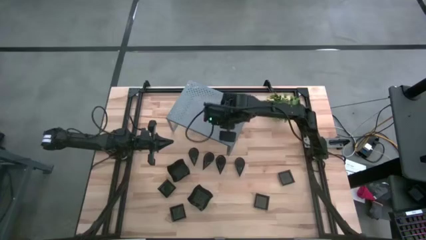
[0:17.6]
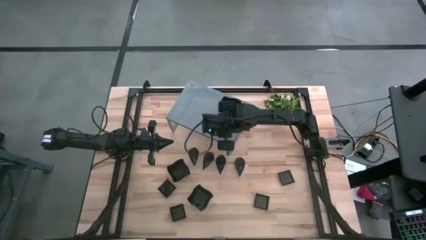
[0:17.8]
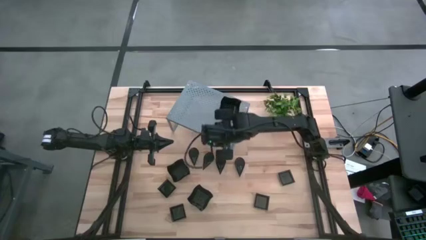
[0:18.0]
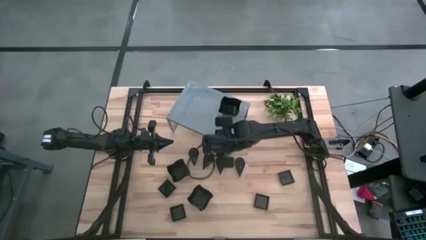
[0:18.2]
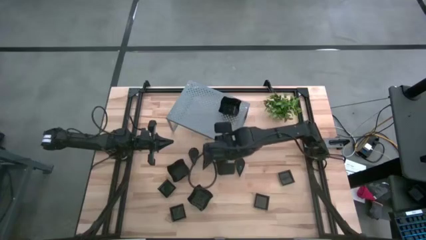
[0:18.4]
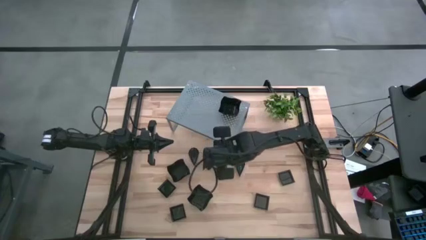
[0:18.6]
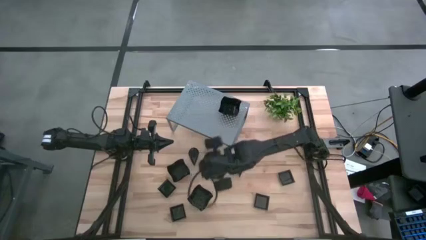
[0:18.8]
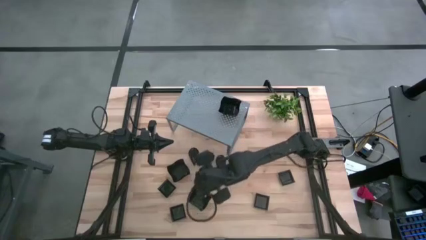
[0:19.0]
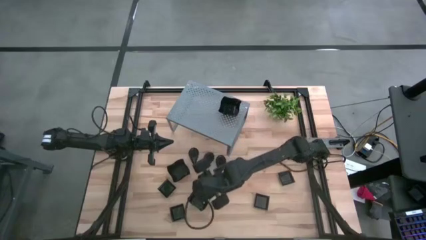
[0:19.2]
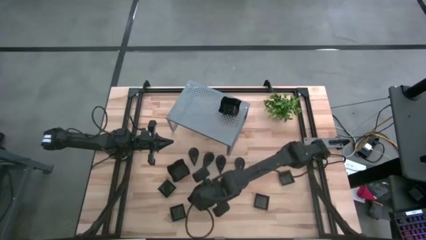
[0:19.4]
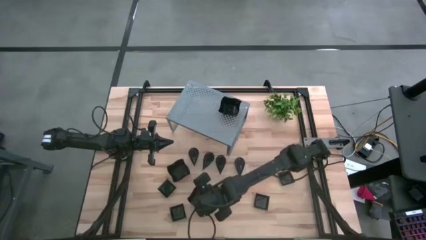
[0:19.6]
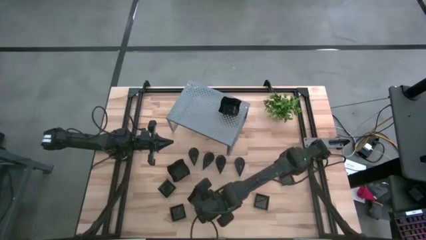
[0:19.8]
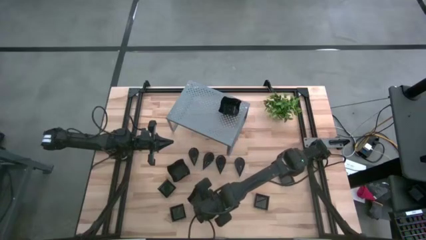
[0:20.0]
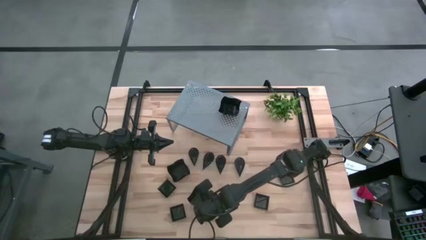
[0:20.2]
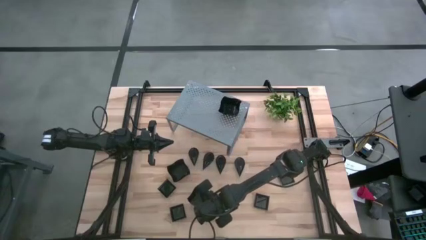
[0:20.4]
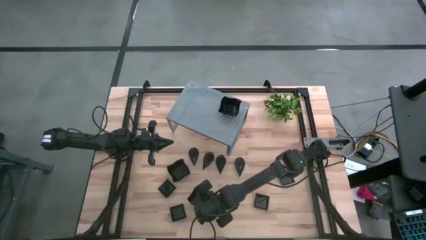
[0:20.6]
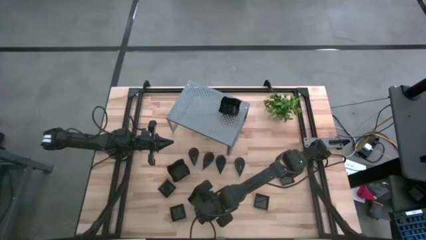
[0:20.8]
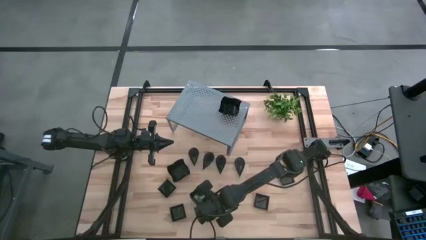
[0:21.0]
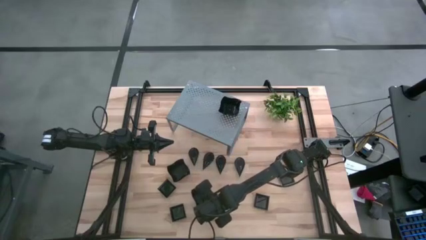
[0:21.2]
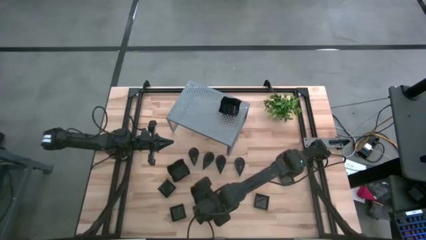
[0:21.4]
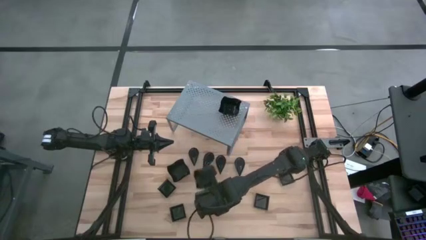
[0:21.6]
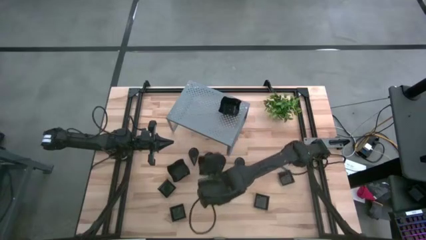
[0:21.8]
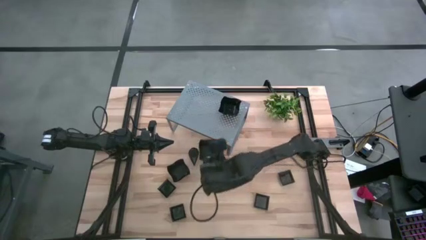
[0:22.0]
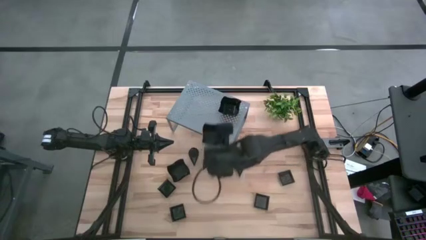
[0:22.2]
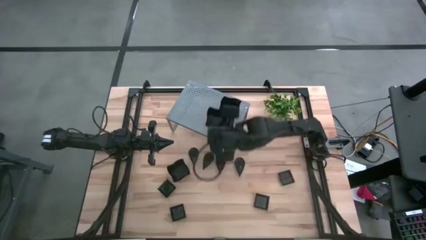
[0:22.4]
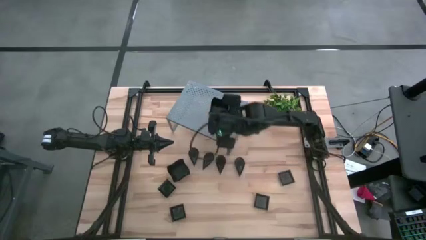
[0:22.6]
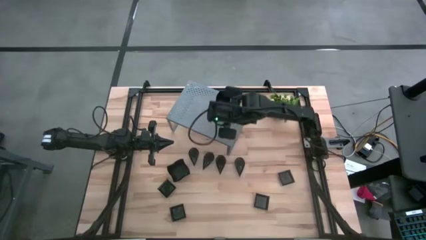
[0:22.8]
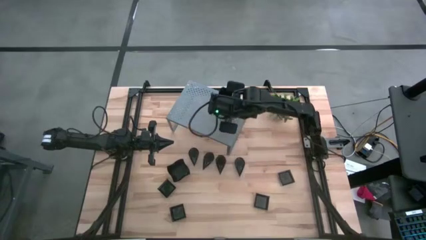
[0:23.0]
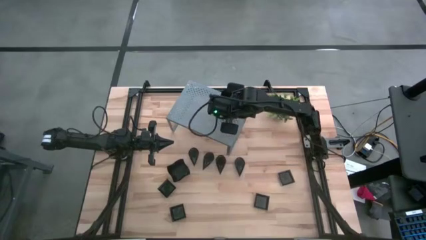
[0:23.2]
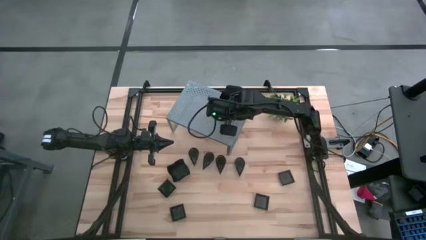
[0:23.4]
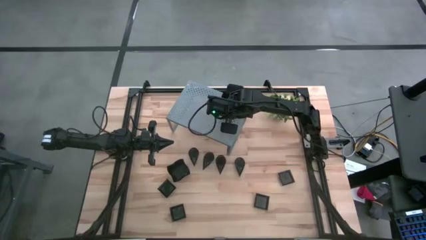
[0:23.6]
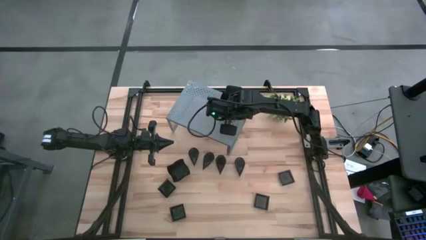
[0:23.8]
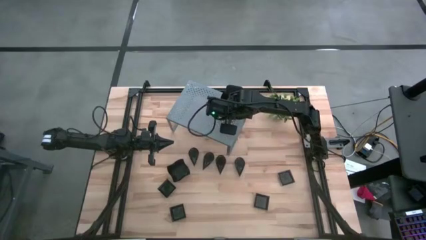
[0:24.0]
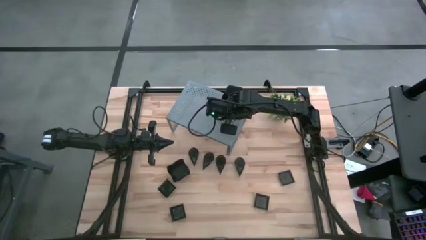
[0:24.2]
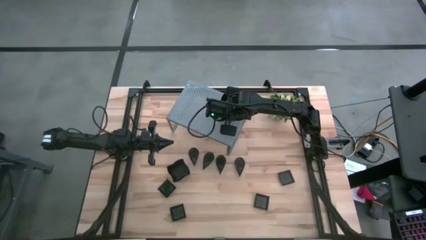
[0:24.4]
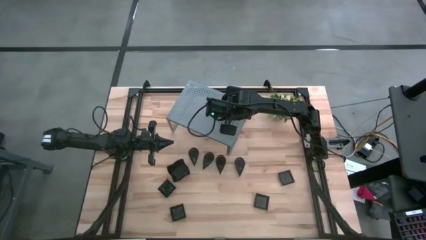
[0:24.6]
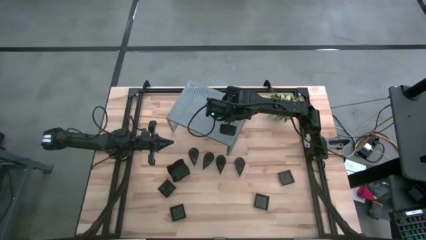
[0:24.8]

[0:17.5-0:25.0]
Task: Pick & Place Mini shaped plates
Stack the bottom distorted square plate into the distorted square plate on the shelf

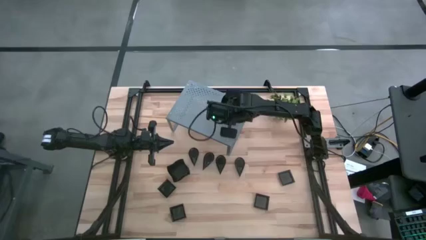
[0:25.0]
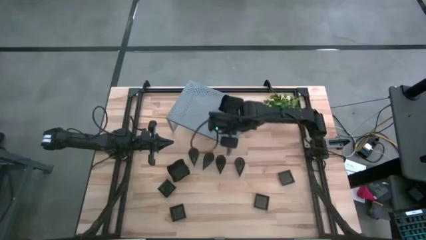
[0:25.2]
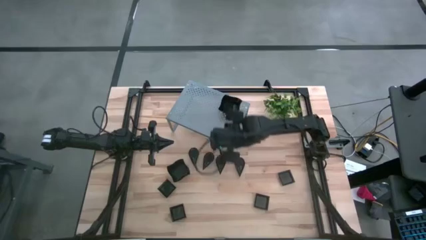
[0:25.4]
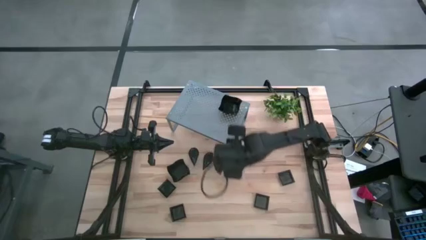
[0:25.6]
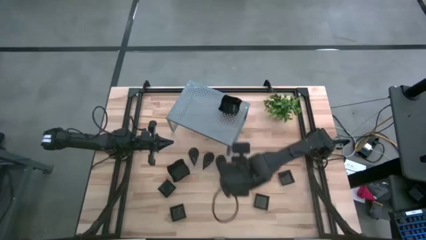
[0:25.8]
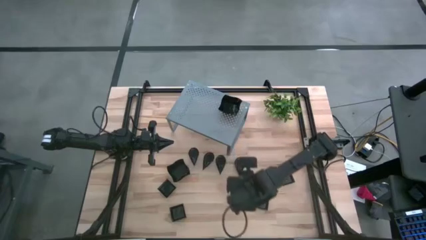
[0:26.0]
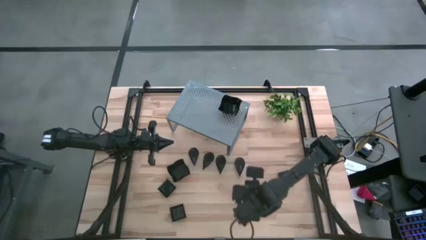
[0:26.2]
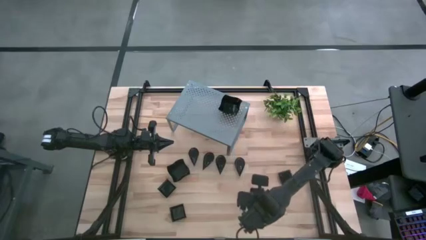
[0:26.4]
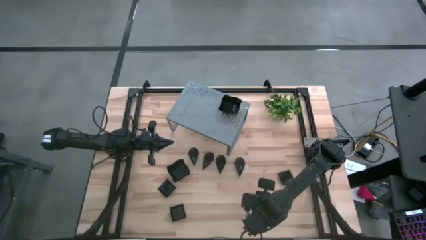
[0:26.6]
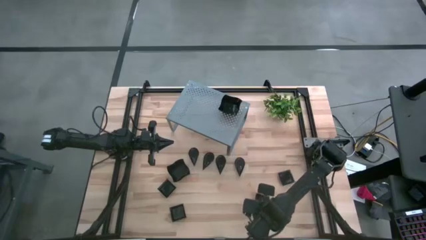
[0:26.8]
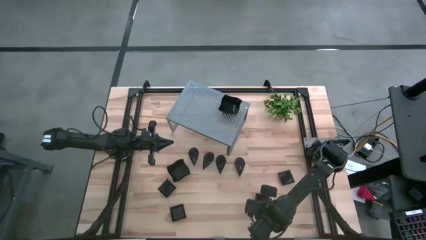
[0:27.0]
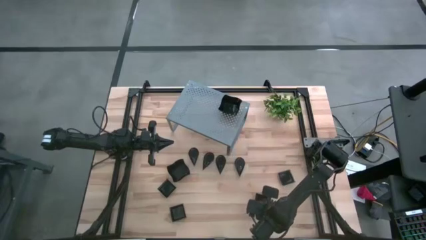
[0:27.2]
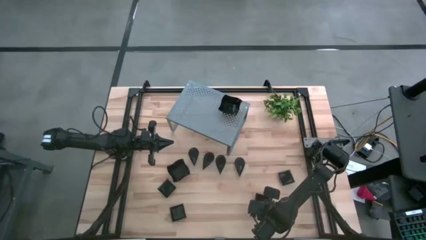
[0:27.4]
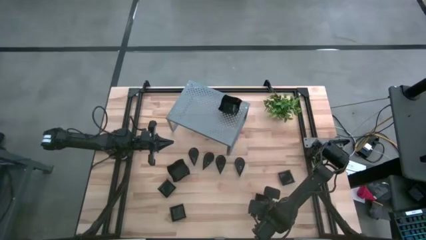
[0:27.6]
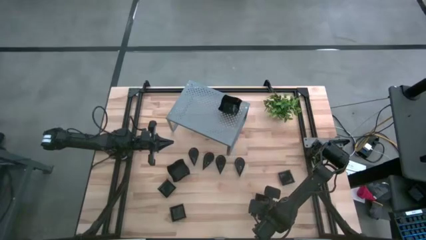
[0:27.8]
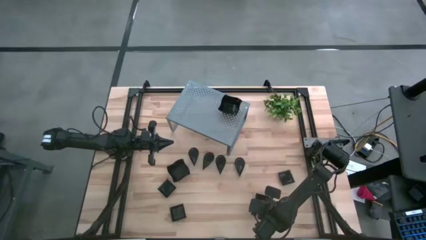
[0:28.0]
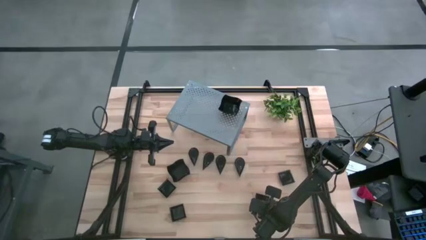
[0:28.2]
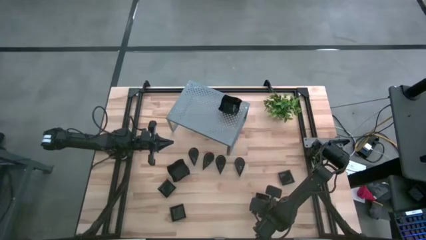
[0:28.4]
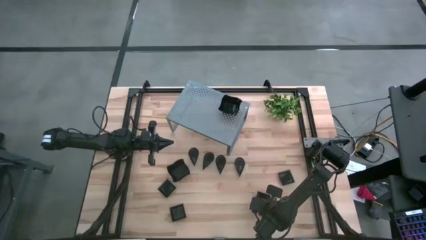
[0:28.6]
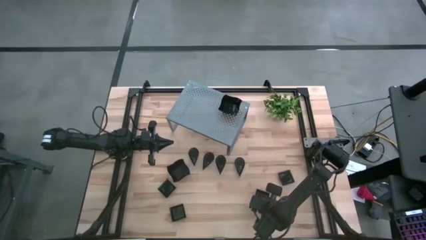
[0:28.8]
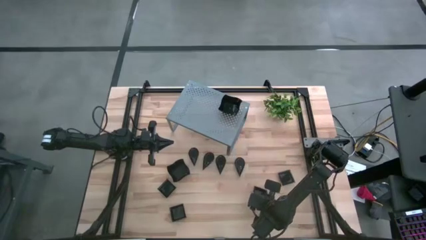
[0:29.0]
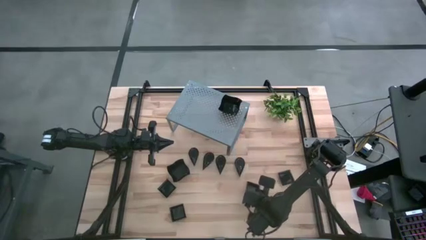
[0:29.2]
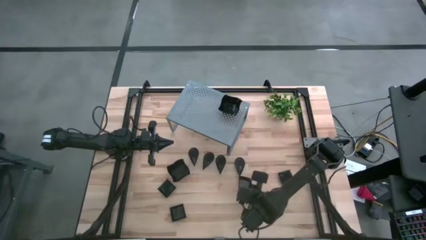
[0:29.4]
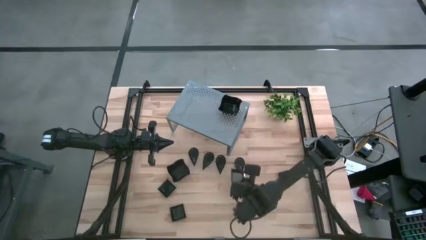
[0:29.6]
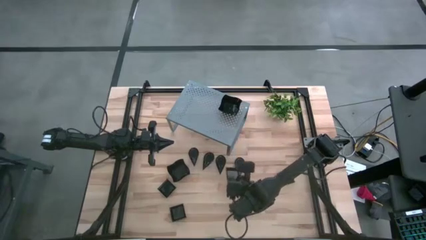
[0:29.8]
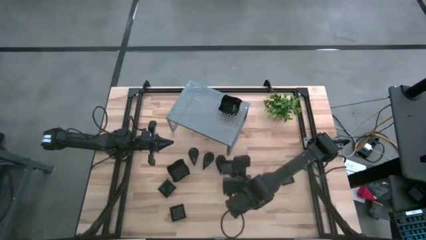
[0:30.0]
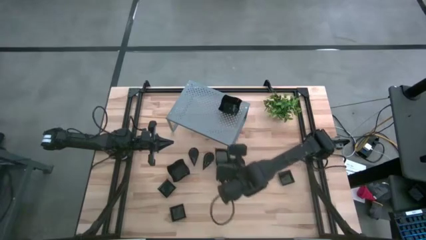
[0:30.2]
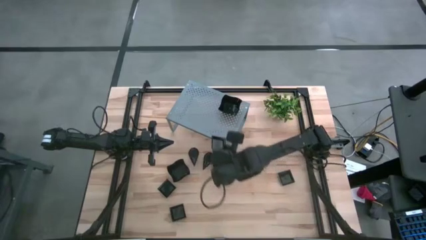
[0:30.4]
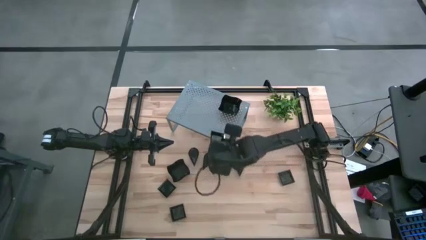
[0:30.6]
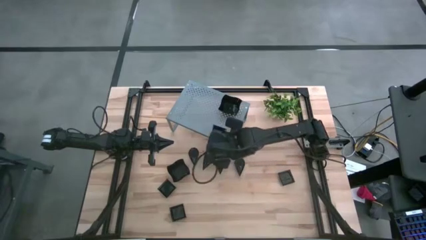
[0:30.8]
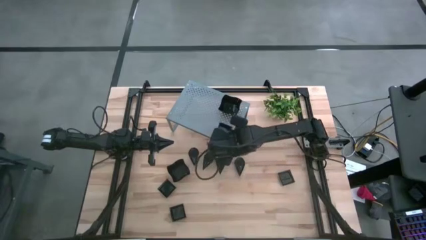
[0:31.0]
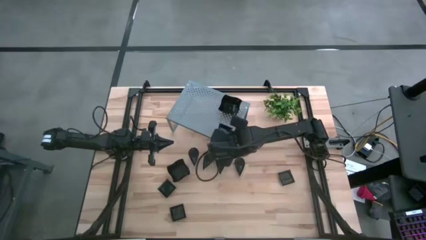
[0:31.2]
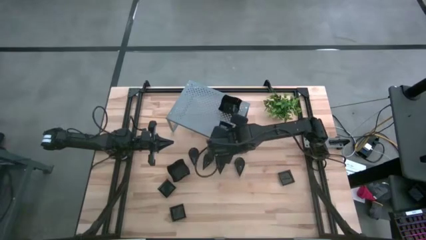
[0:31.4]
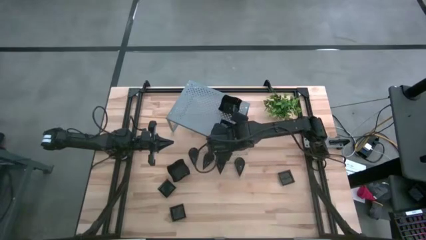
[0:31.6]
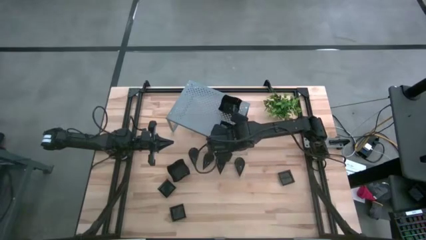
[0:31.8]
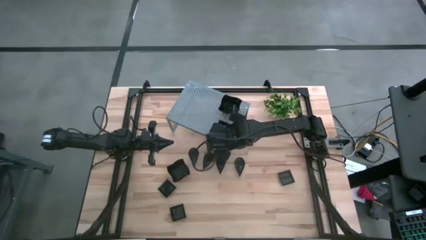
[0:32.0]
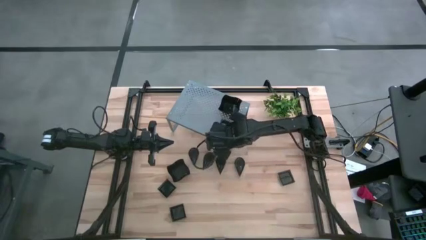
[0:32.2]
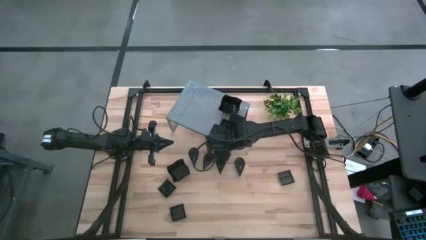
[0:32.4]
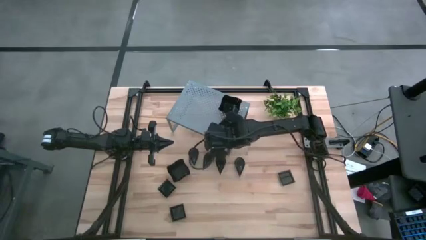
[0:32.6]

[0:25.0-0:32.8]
Put the bottom right square plate on the shelf

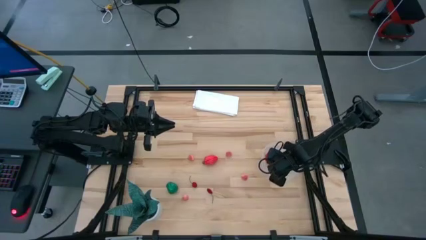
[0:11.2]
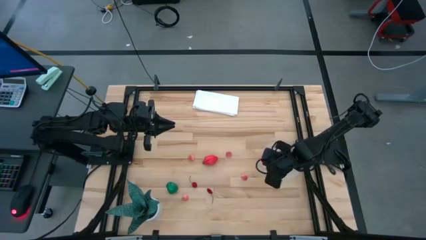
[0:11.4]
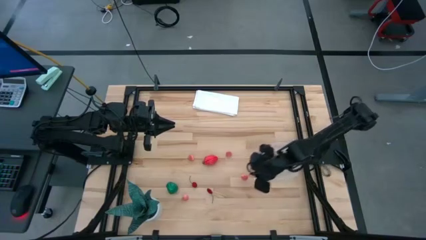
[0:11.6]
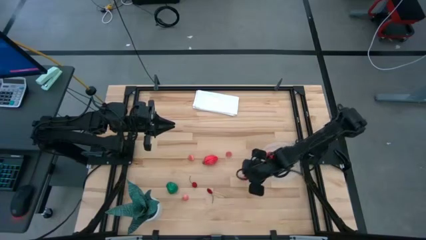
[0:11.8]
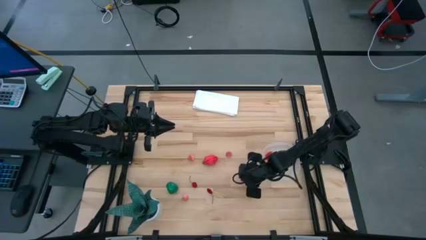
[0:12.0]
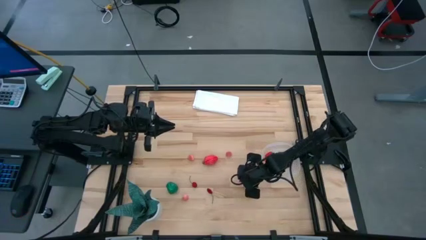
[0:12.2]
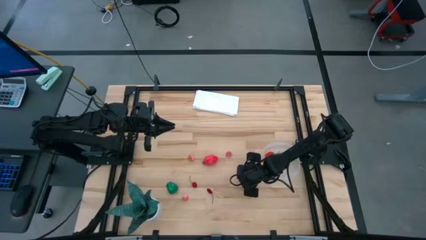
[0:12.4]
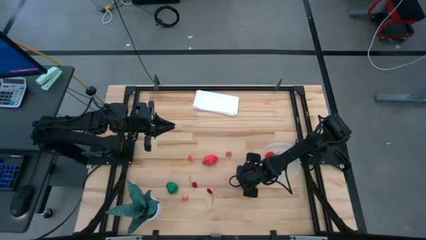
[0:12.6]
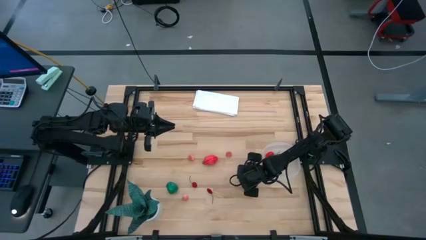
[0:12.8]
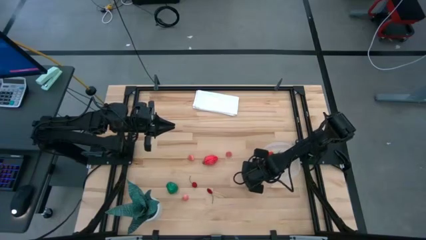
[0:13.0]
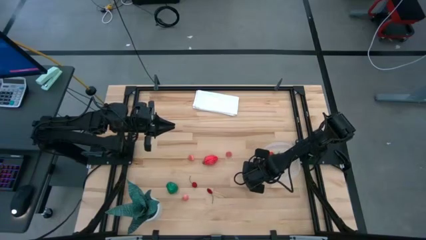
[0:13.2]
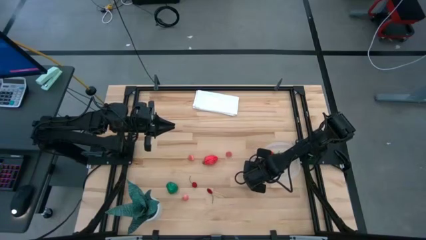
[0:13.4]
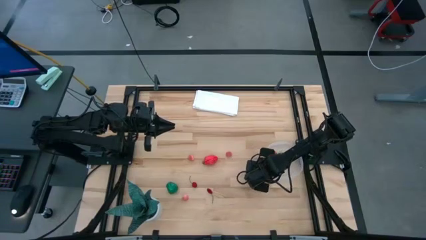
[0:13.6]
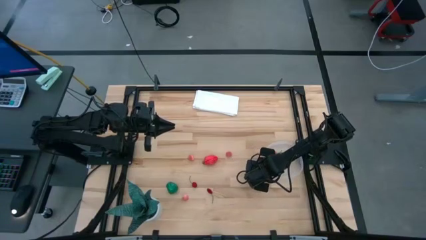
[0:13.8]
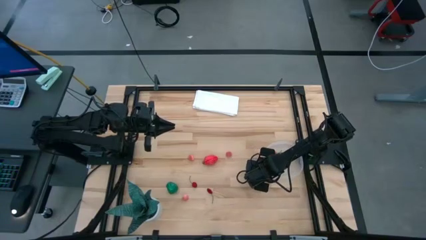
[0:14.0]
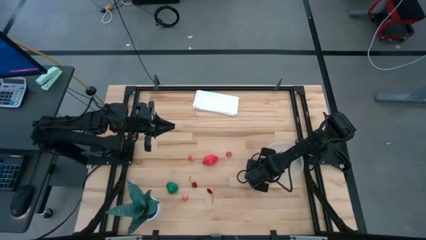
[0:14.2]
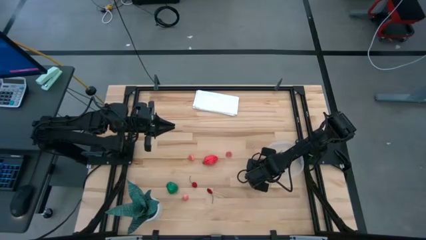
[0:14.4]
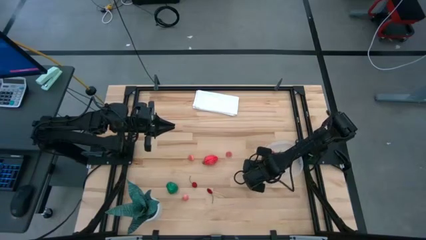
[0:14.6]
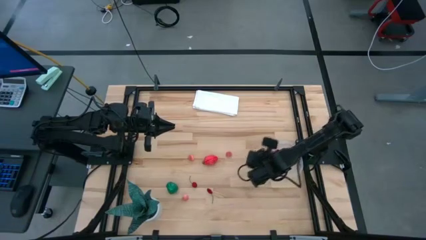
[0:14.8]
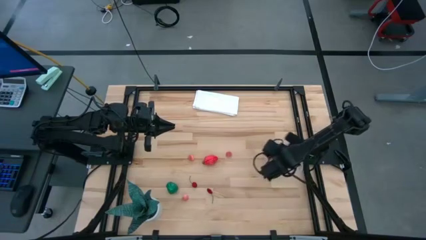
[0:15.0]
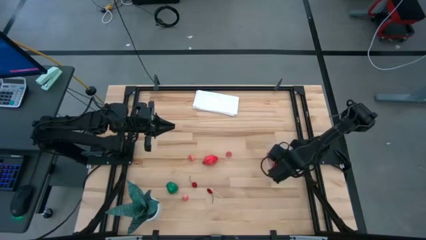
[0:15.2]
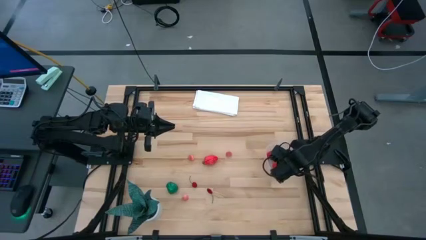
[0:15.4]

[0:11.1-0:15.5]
Task: Pick and placing Produce into tupperware
Put the pink peach into the transparent bin
